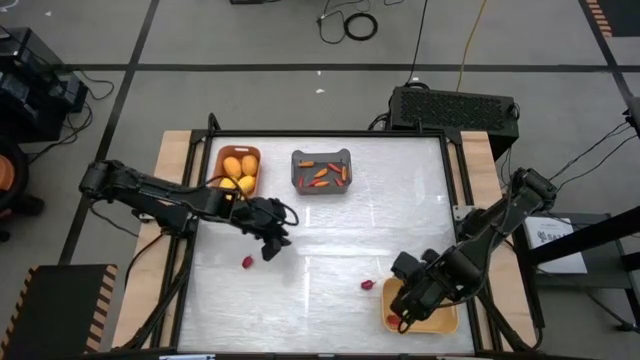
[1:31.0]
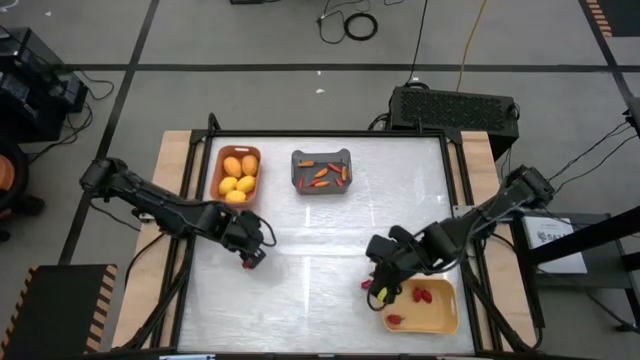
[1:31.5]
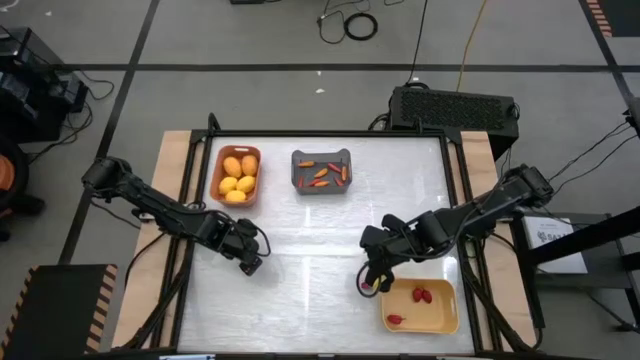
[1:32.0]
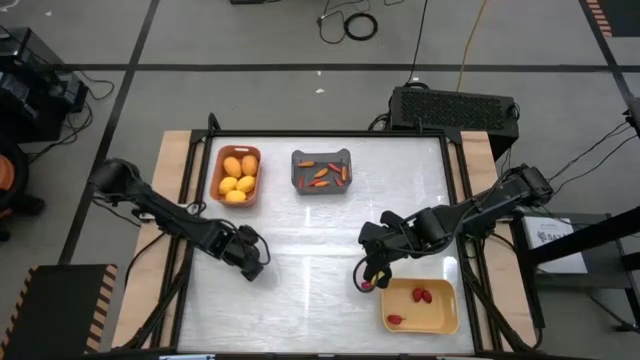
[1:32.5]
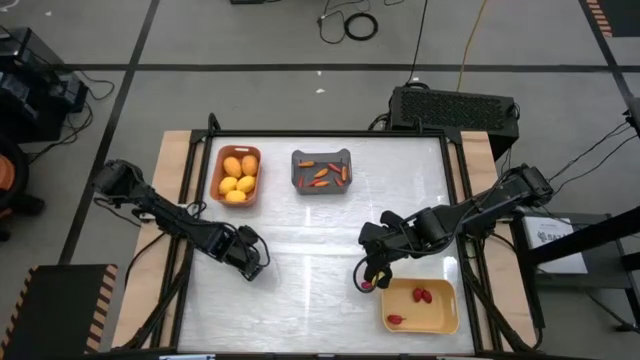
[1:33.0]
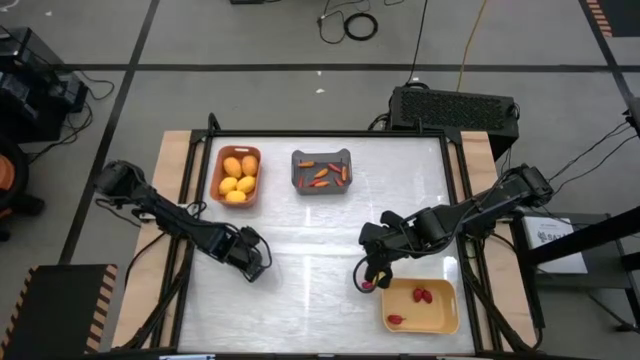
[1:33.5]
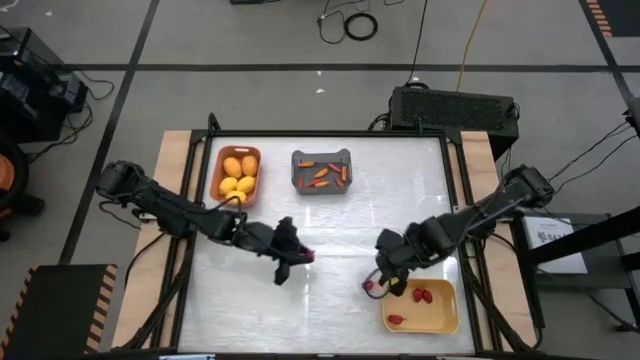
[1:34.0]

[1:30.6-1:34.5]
Task: Sort produce into baskets
Put the red chili pepper into the yellow bin

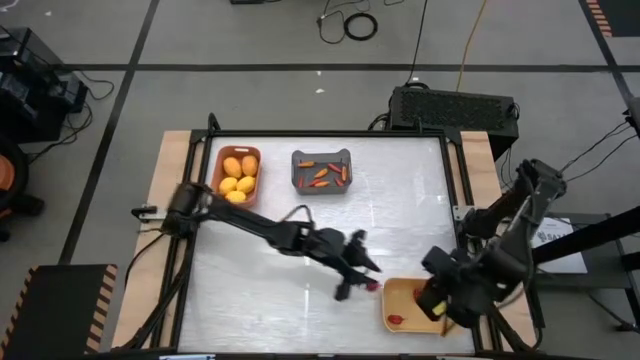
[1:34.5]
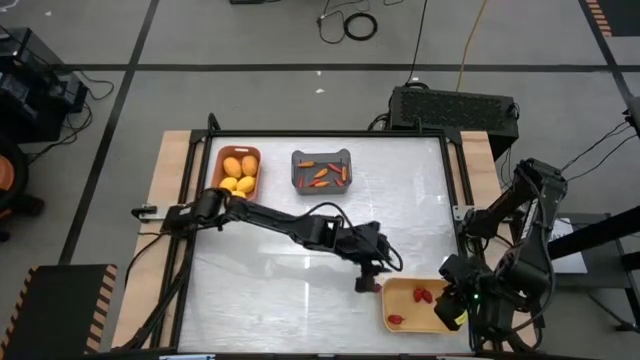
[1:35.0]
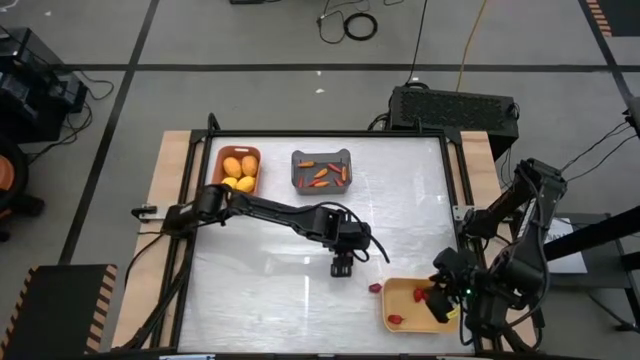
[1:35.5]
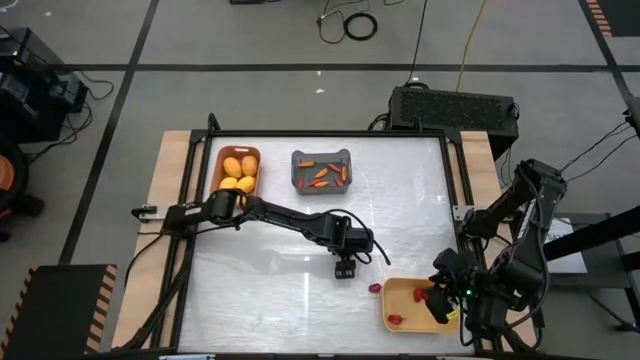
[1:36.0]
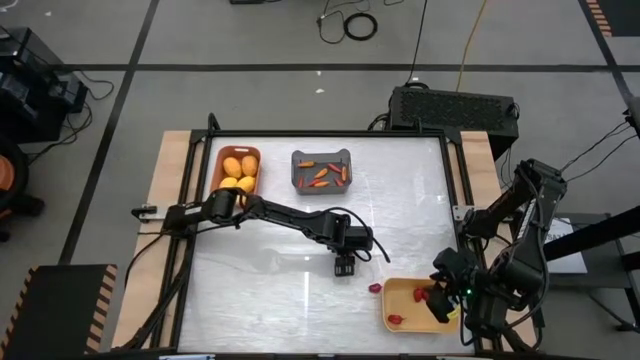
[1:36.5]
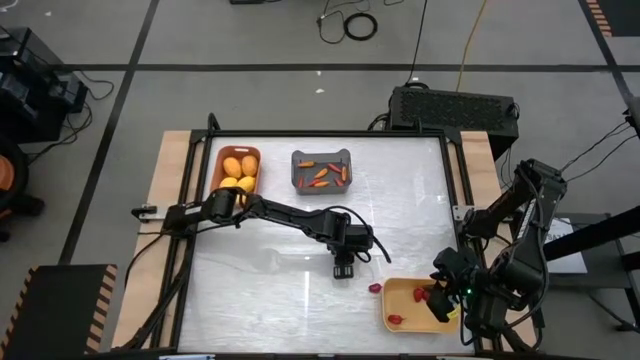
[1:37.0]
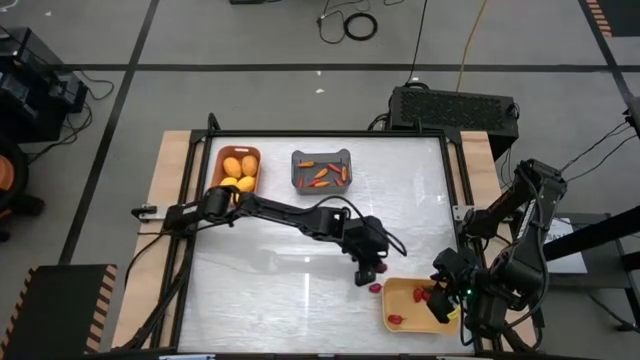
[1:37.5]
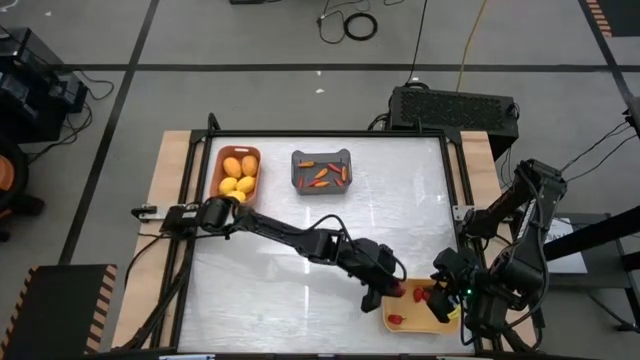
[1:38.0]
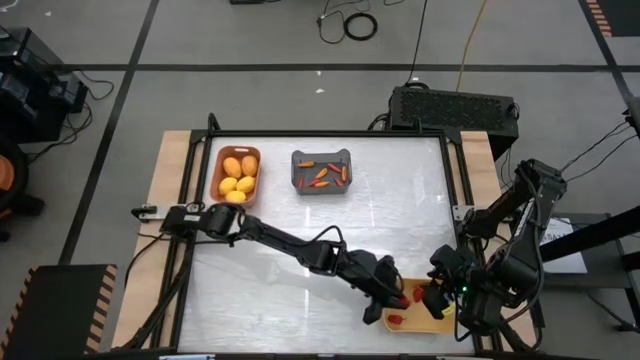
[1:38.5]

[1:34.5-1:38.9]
Put the red chili pepper into the yellow bin

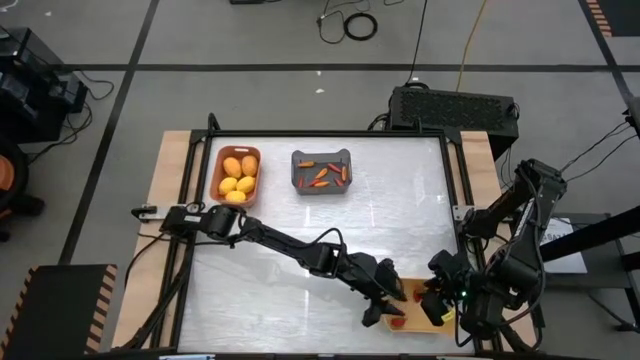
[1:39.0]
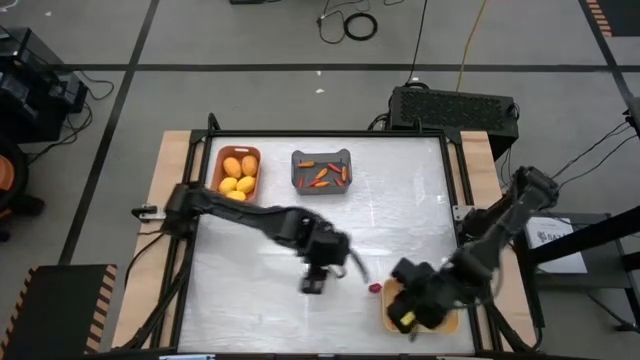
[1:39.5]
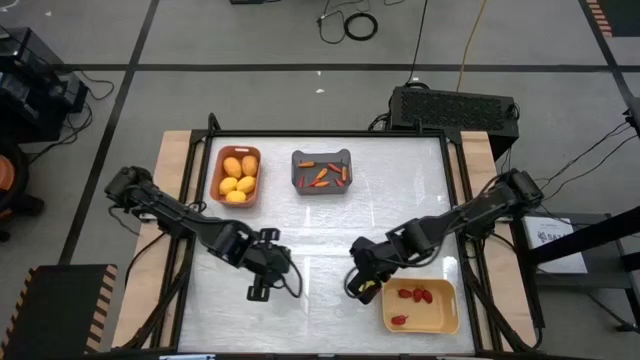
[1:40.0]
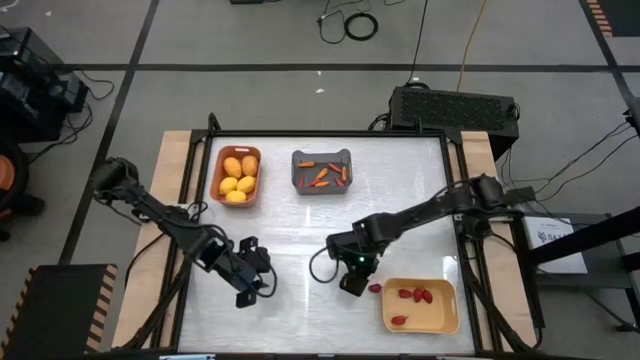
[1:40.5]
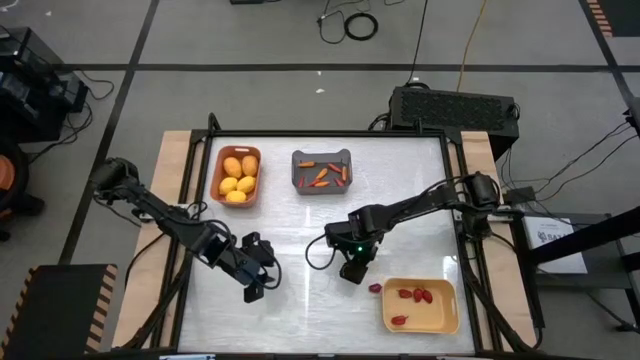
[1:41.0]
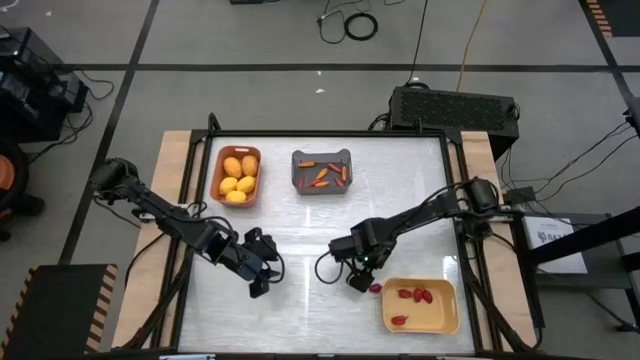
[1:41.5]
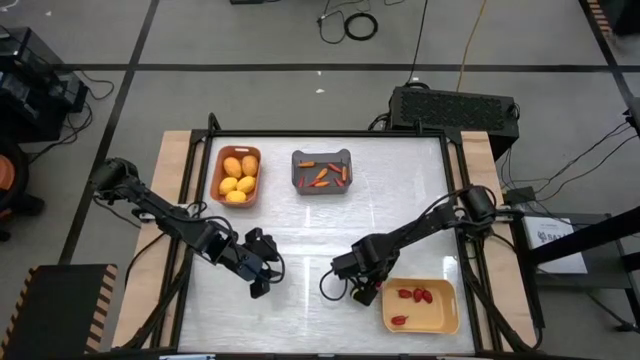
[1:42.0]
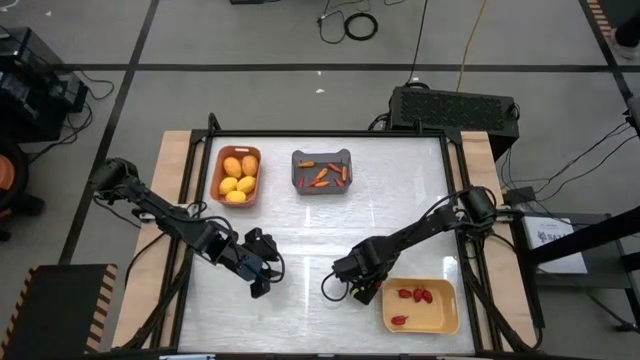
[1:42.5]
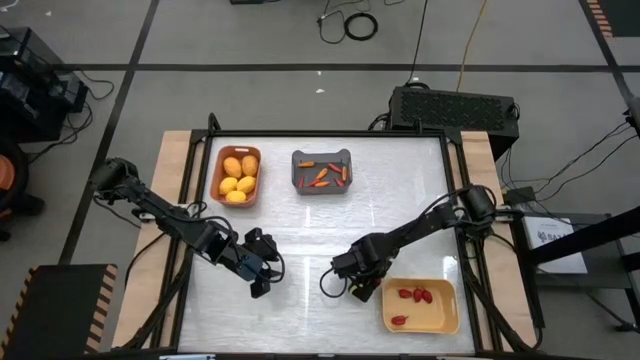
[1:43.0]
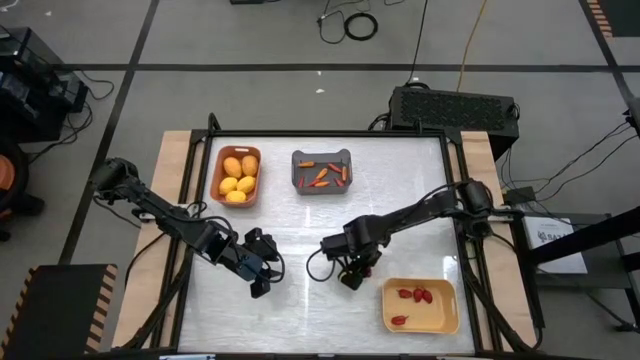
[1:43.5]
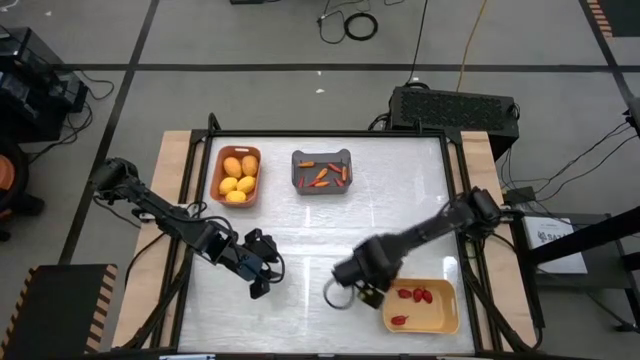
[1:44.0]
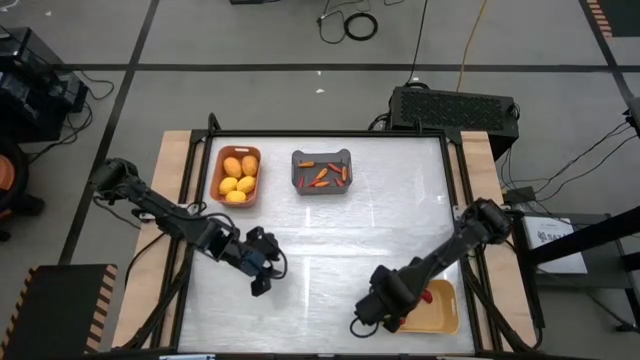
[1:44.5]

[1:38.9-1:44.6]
Put the red chili pepper into the yellow bin

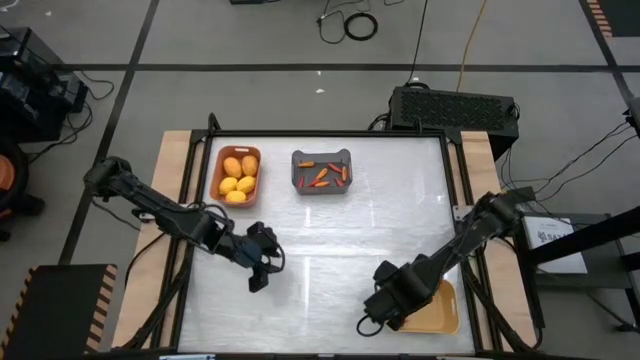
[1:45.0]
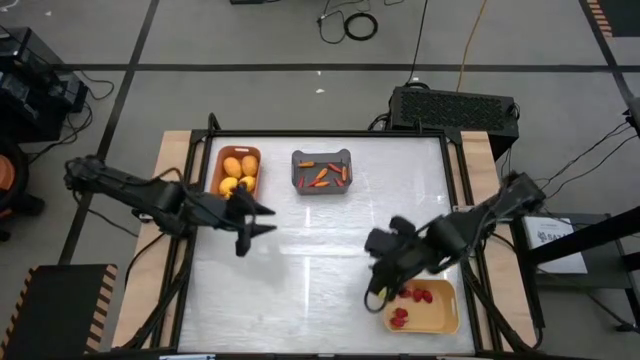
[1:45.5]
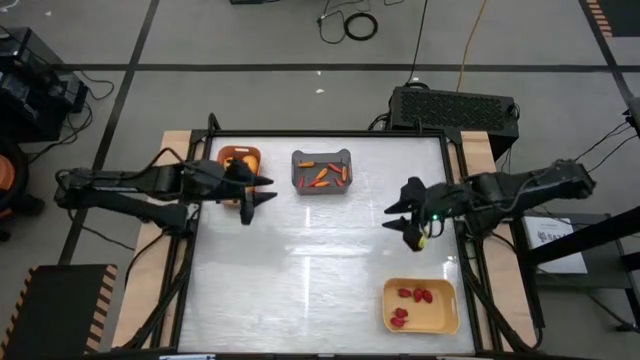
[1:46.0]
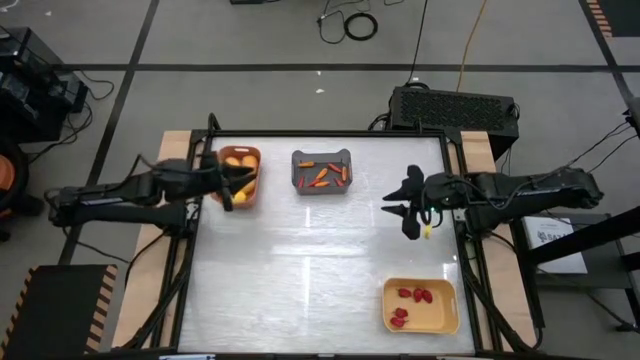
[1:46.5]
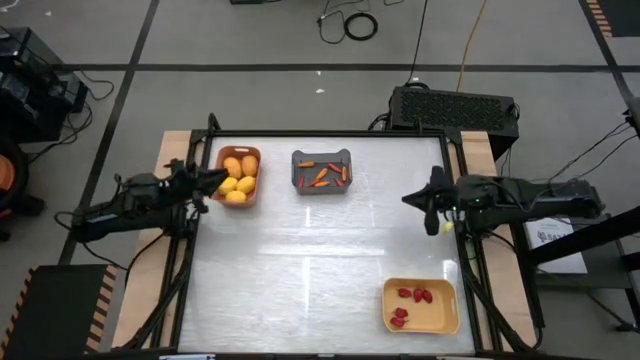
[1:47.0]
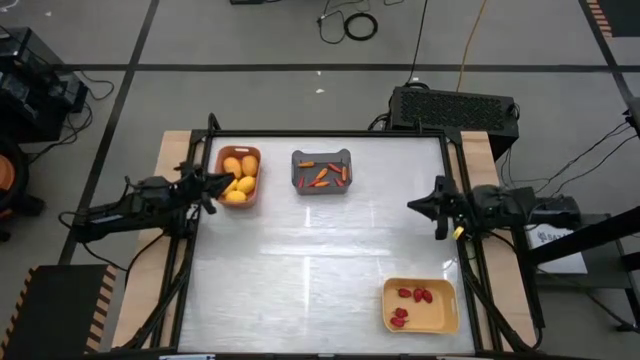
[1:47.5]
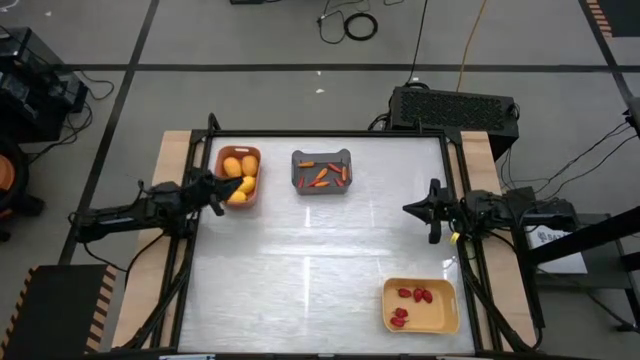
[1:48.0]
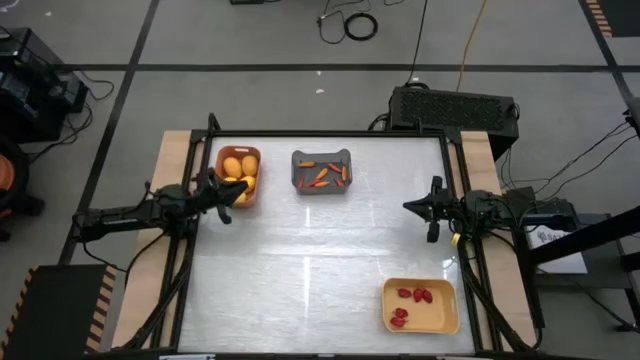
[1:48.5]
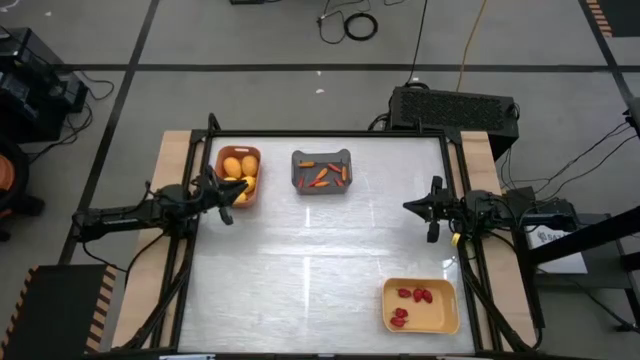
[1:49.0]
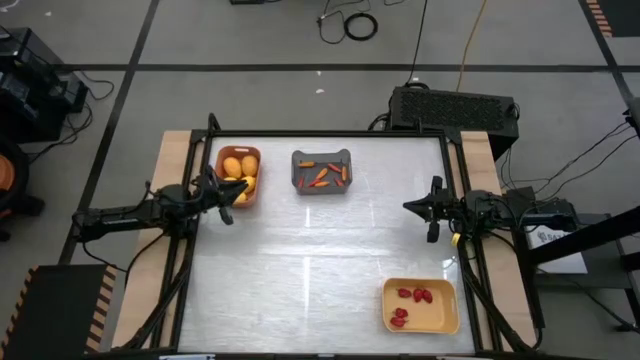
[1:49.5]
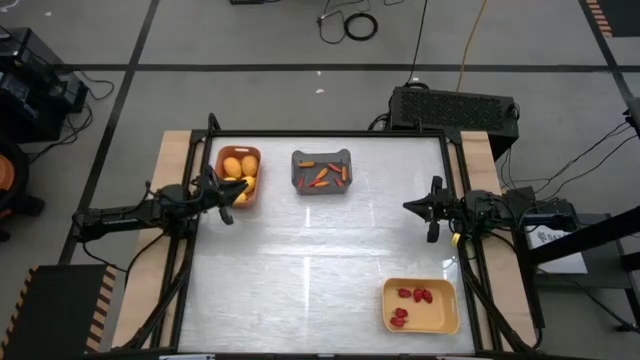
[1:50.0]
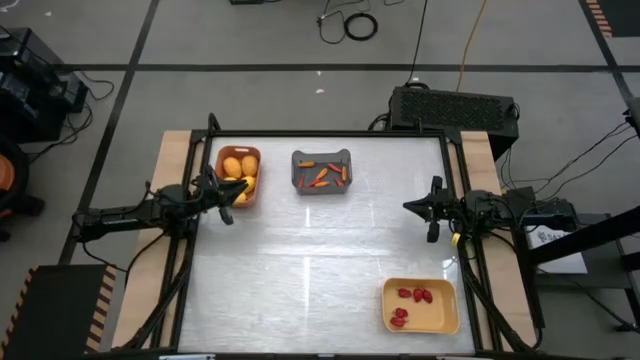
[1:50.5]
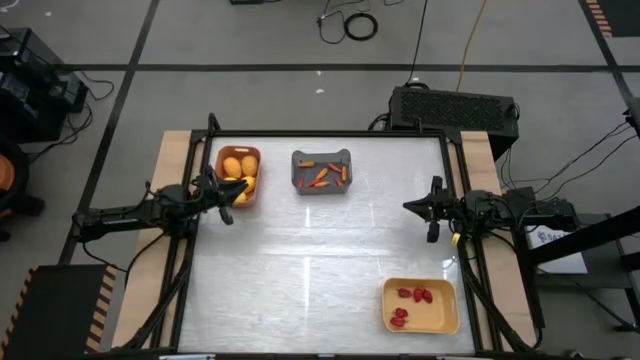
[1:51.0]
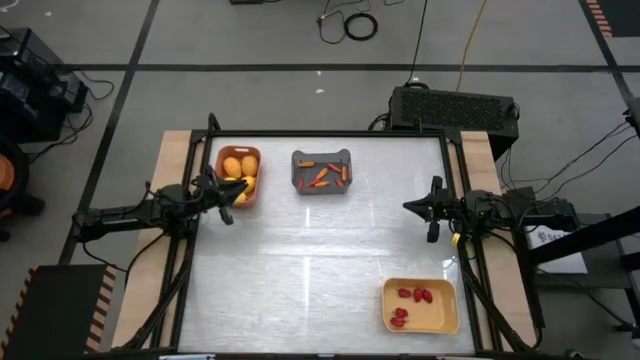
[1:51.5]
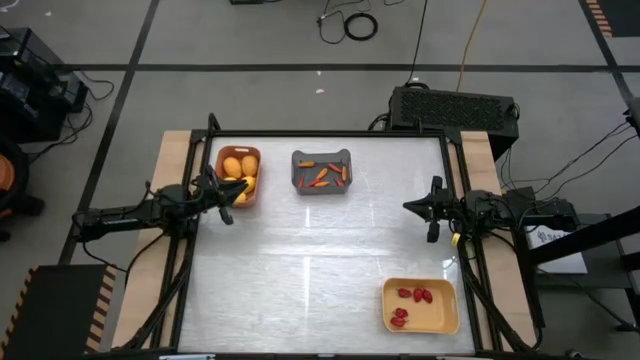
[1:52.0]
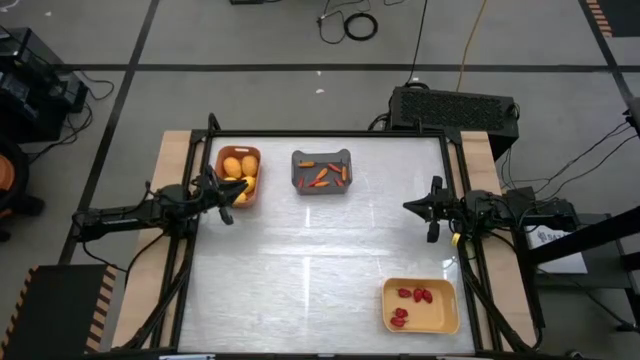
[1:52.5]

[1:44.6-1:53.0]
Return to Home Position
